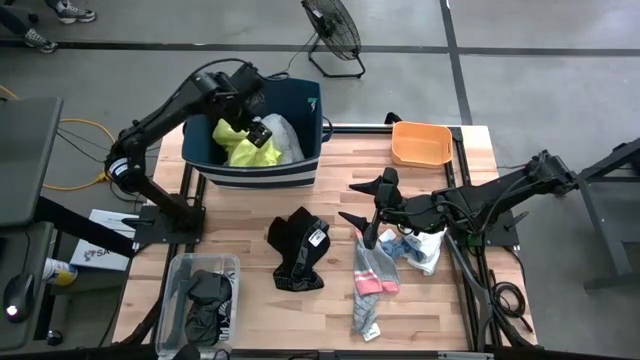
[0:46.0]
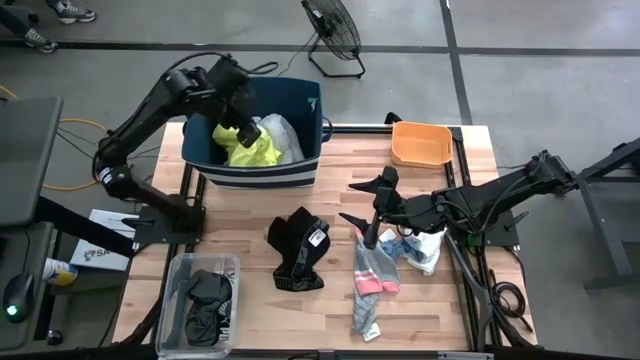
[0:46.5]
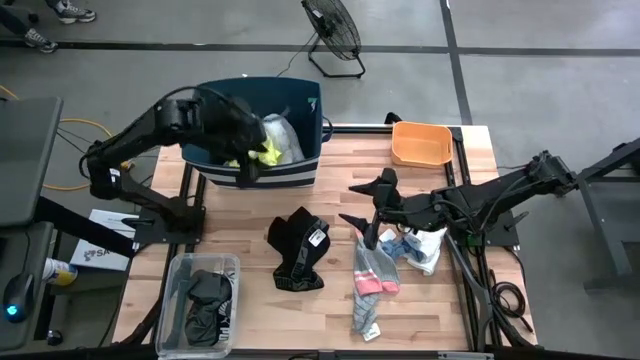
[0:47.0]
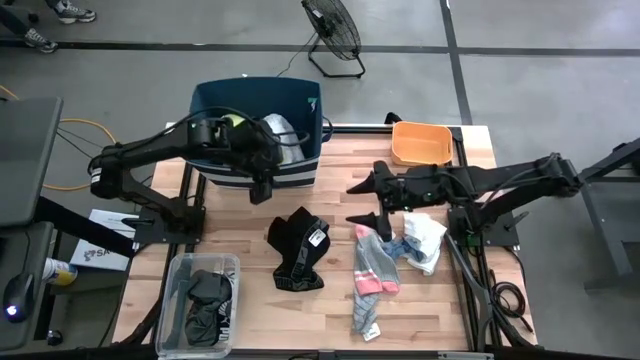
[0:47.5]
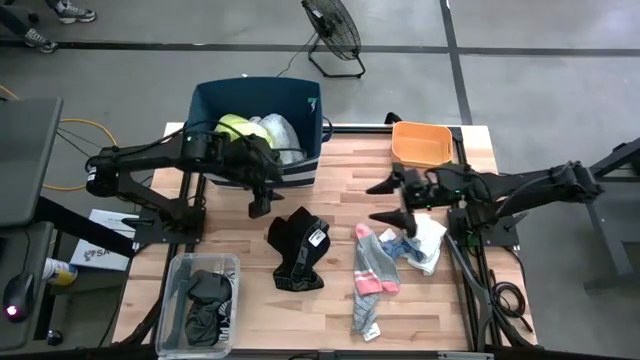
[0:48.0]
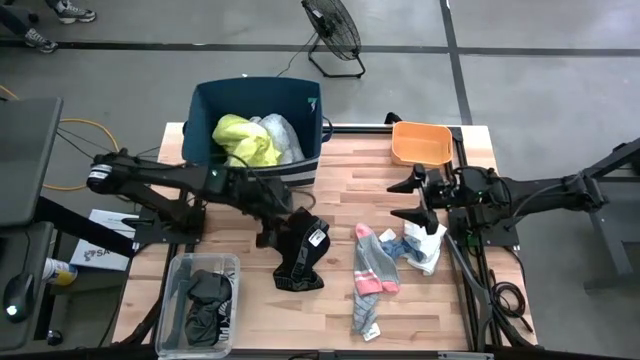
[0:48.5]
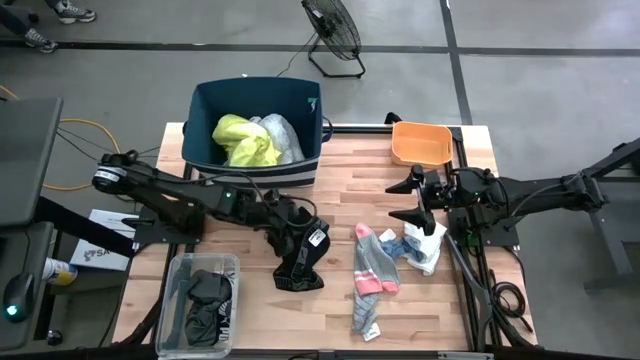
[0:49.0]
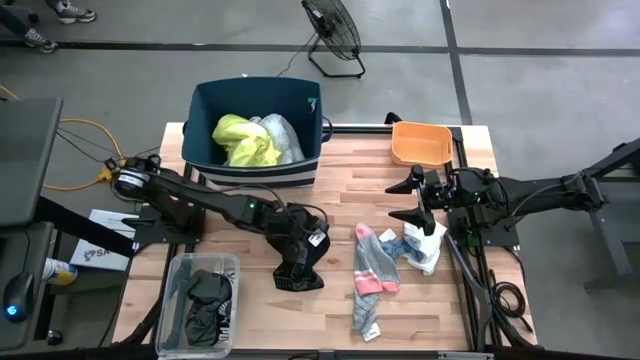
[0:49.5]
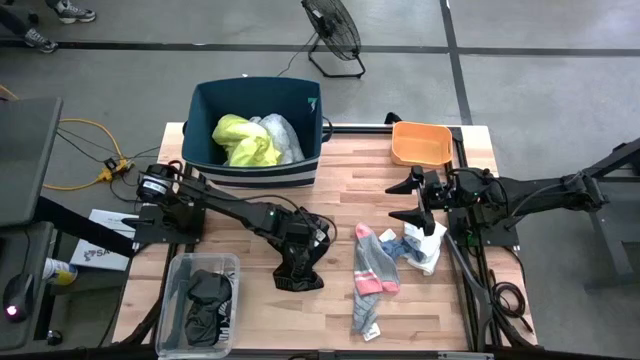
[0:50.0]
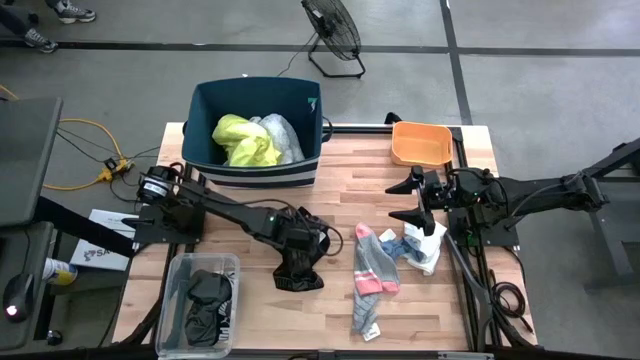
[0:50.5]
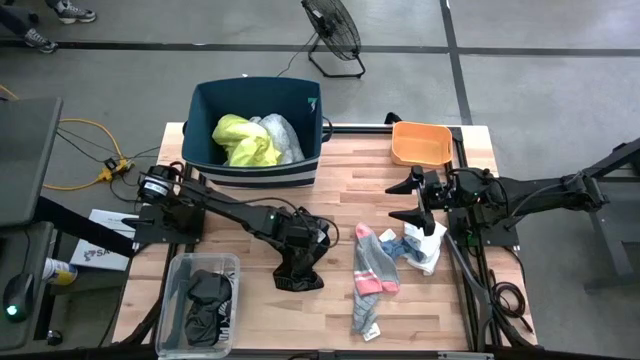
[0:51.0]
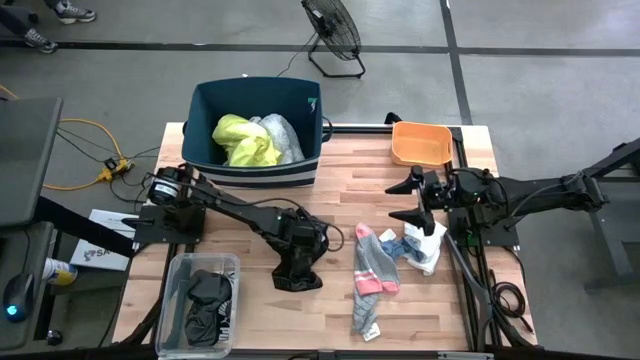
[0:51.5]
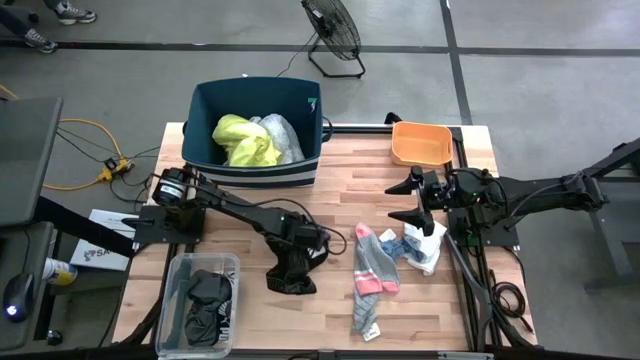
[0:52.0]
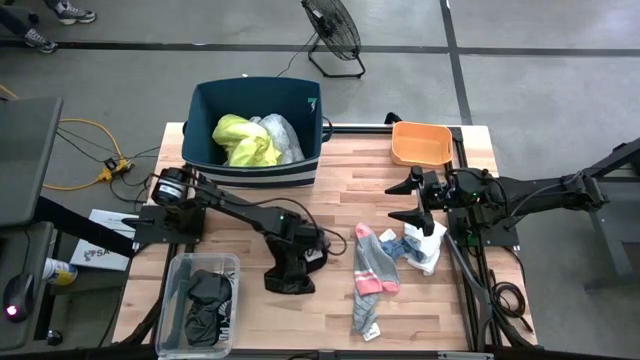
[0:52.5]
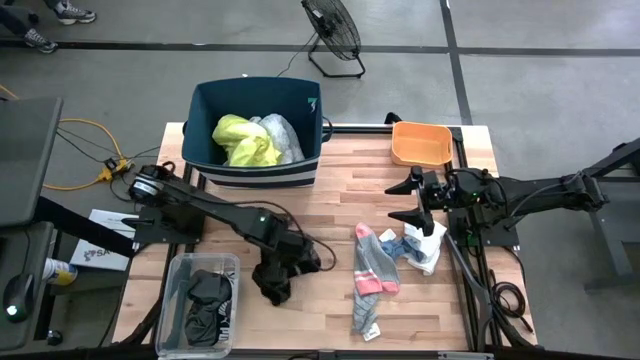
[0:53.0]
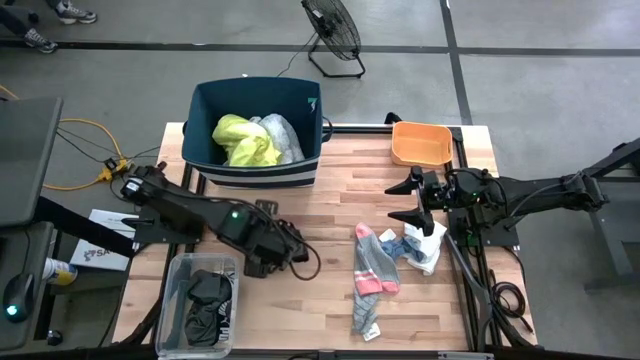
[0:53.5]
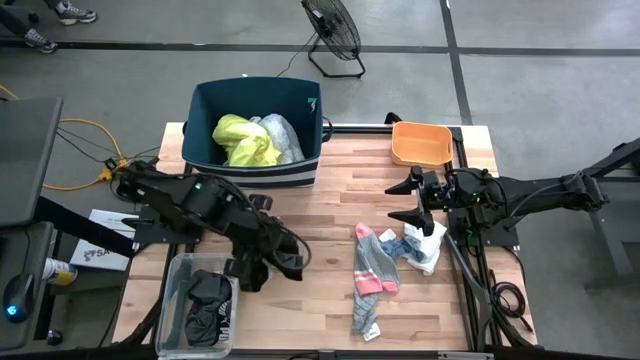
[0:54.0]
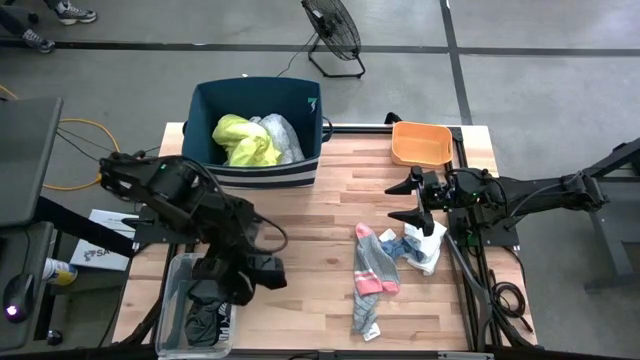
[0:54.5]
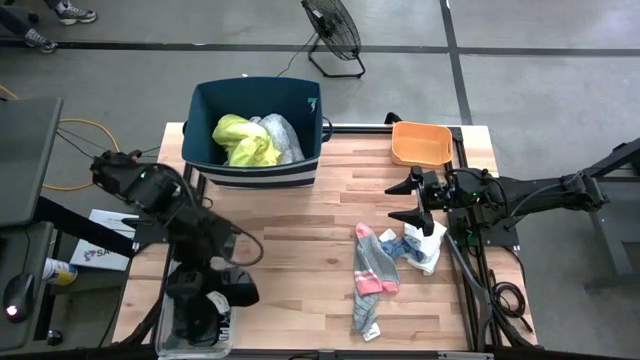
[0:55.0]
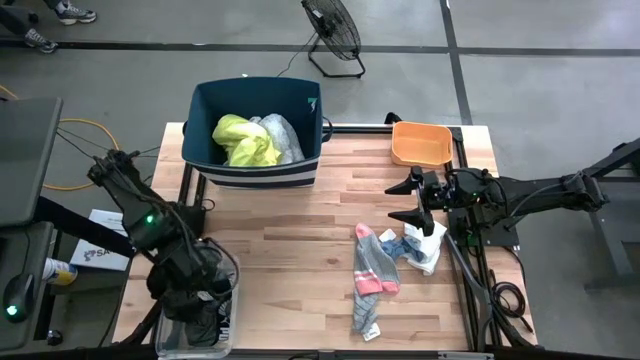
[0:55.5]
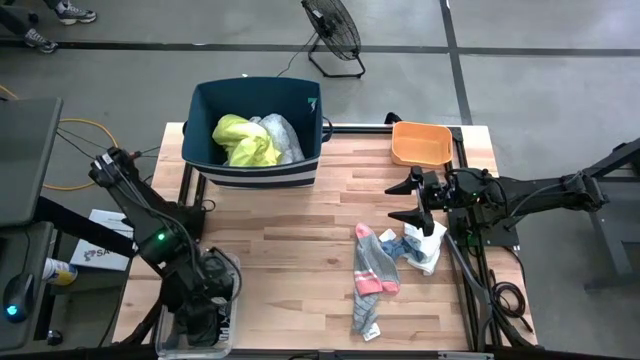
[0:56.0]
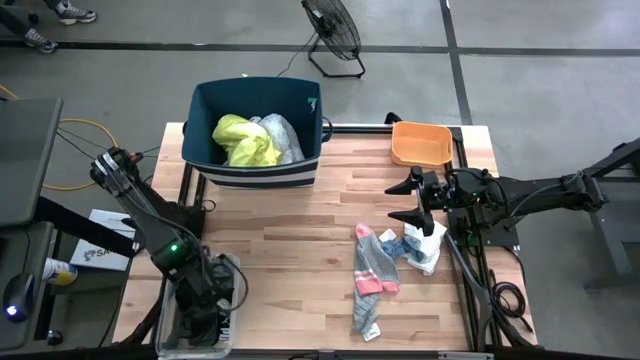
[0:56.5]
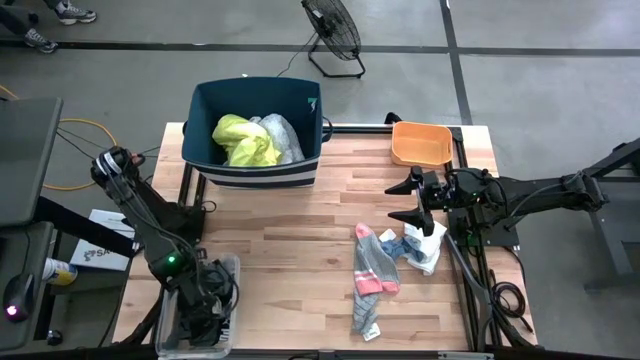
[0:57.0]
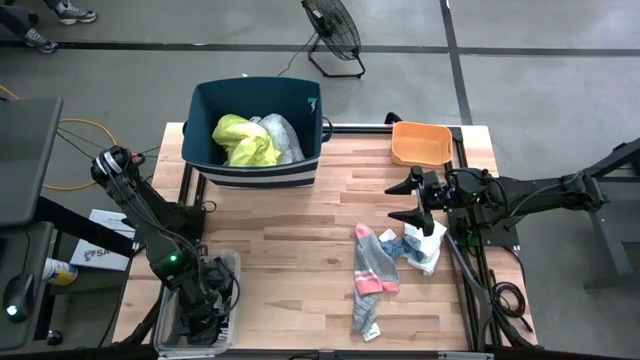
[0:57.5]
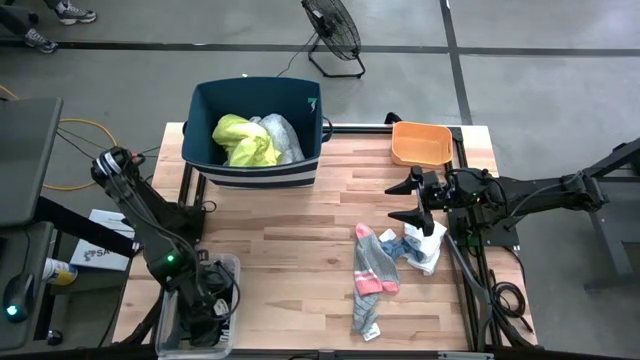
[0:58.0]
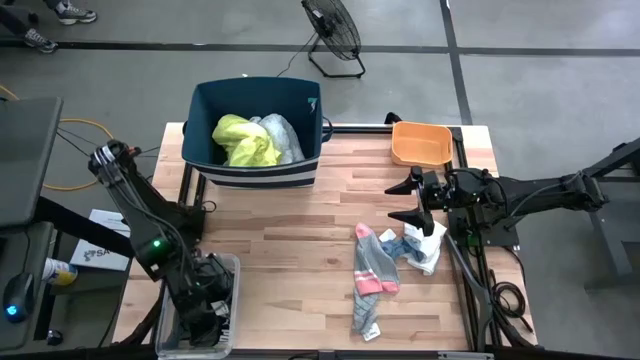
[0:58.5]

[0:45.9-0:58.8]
Task: Pick & Place Cloths
Put the black underwear into the transparent bin

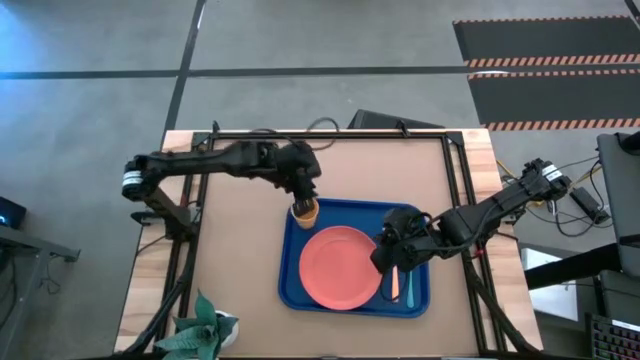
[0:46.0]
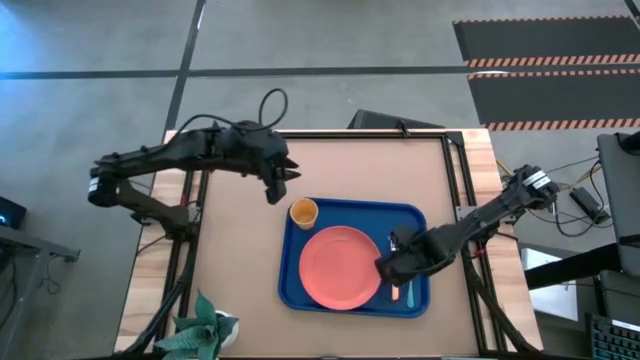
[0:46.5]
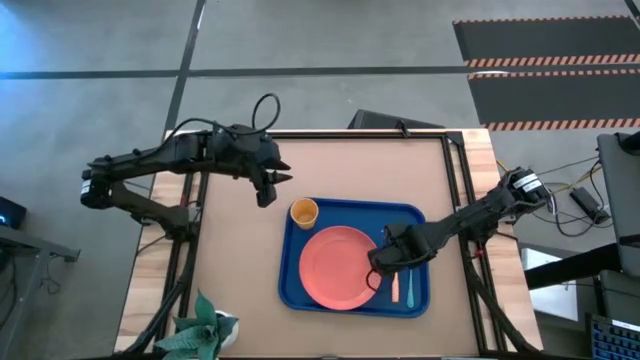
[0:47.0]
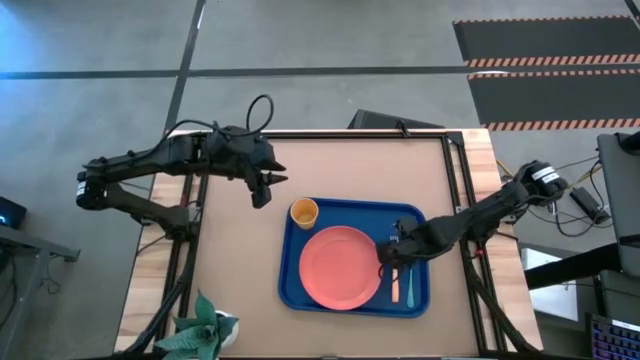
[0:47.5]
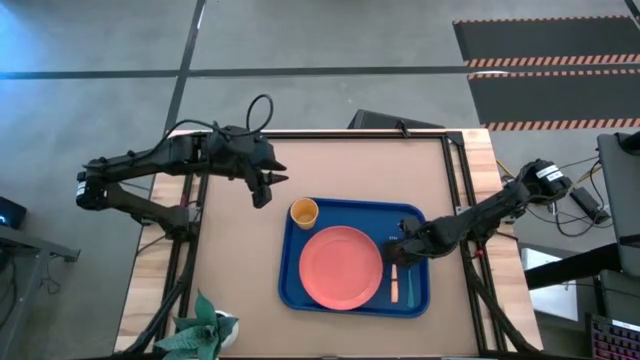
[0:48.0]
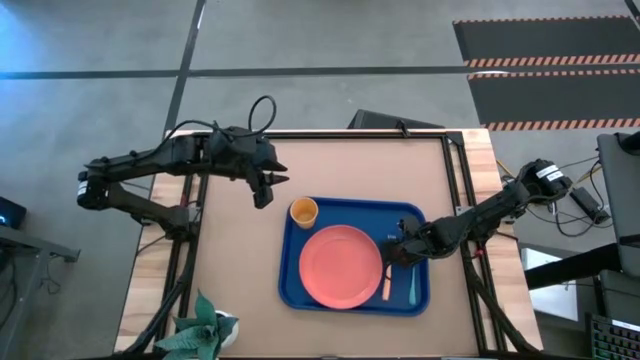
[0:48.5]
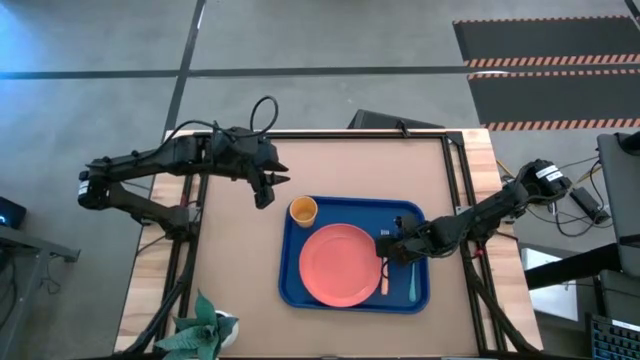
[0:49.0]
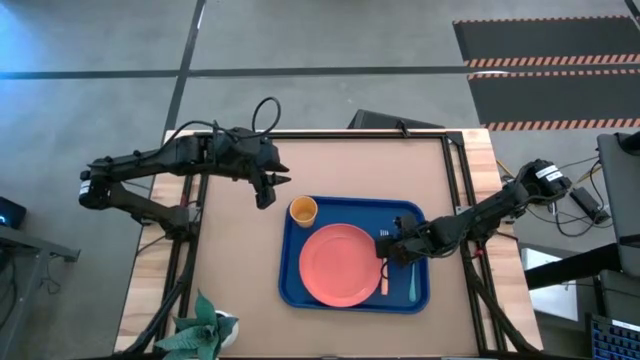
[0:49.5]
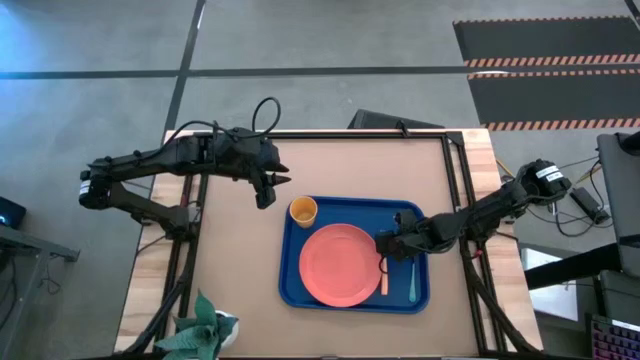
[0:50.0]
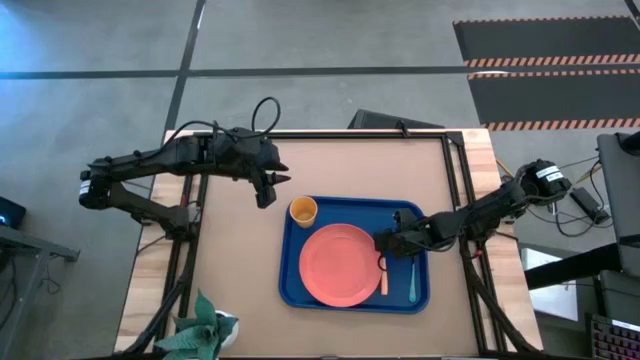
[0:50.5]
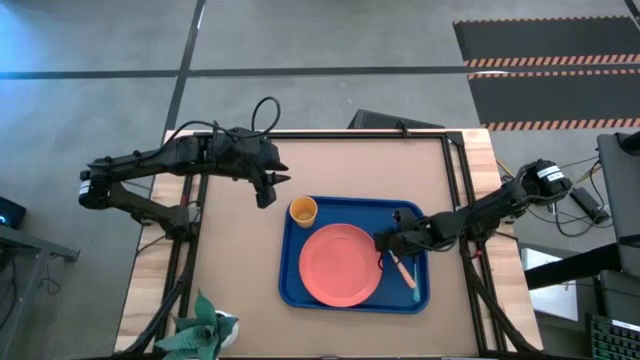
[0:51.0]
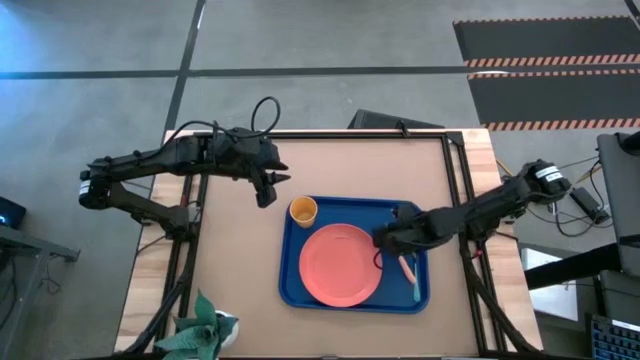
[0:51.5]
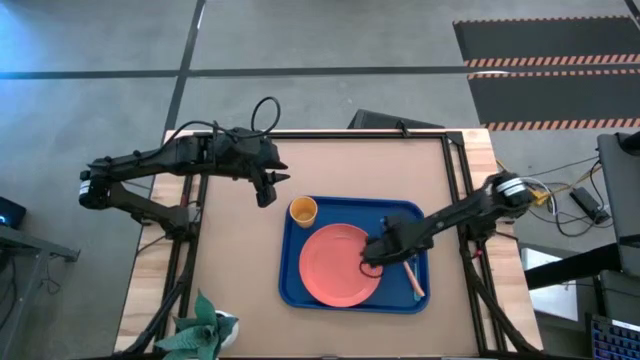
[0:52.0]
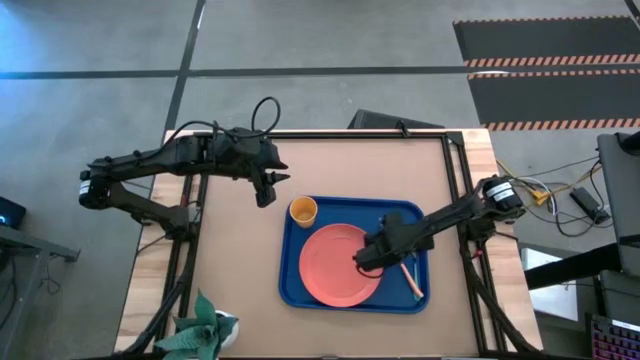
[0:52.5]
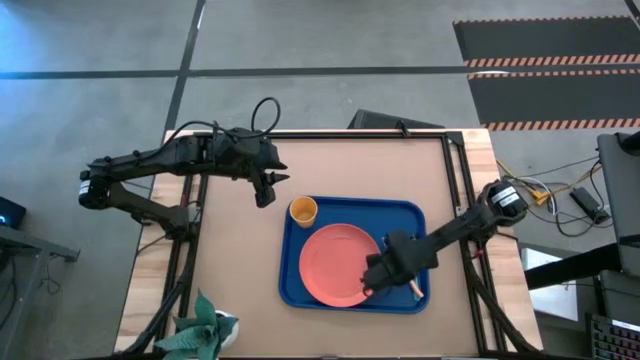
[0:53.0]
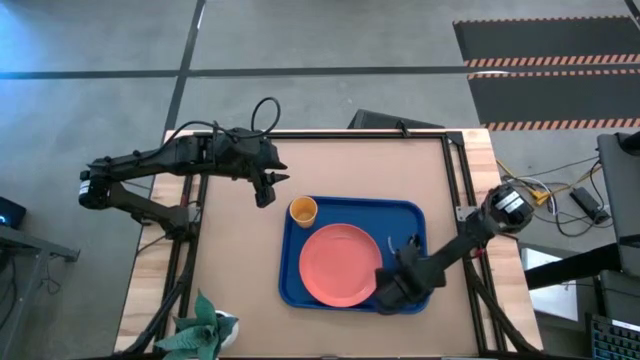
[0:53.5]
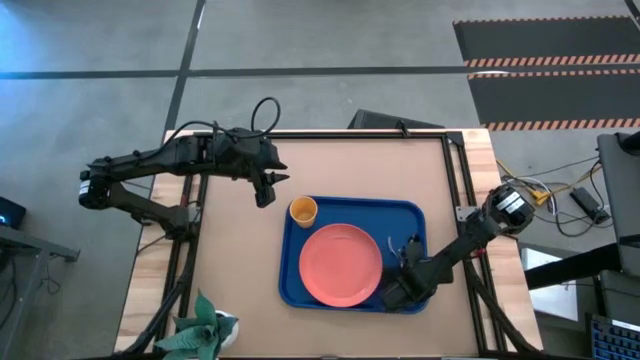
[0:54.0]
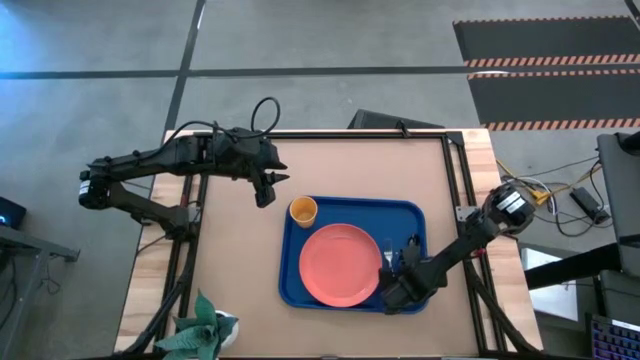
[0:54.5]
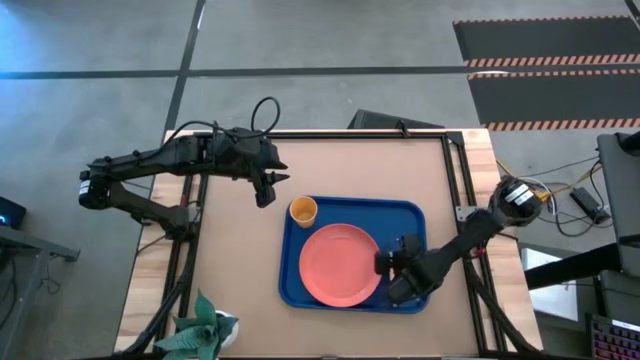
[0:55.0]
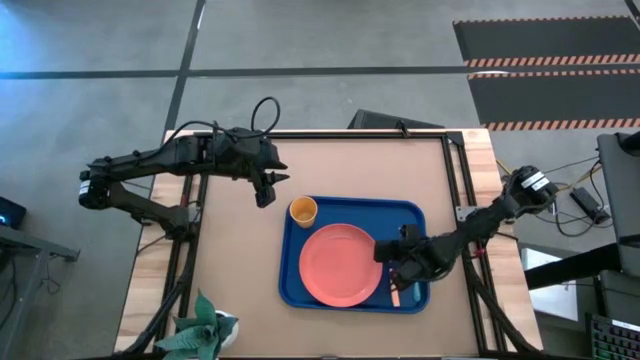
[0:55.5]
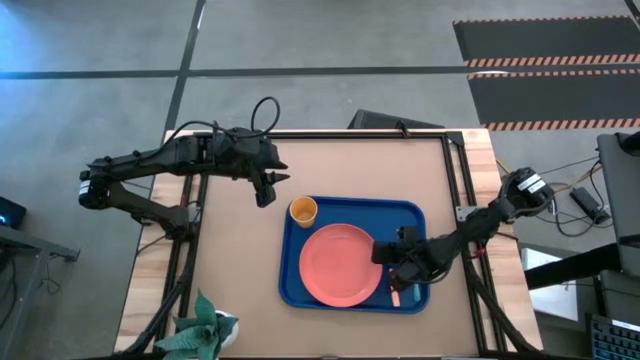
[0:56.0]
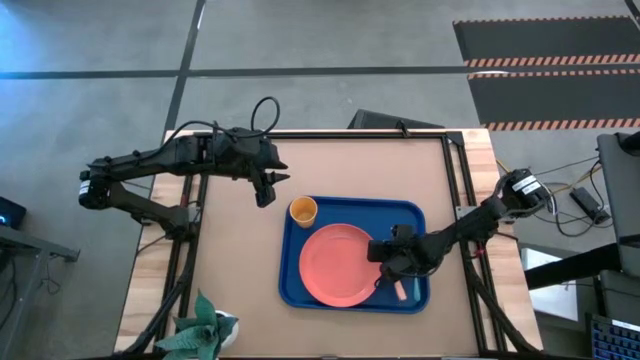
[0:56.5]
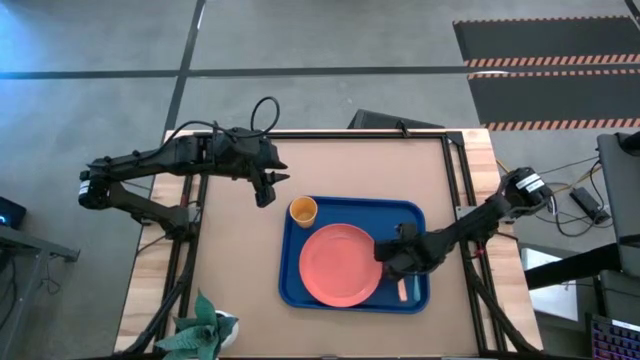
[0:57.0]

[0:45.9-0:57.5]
Task: Pick and place plate/cup/fork/spoon on tray
Adjust the light orange fork on the blue tray
